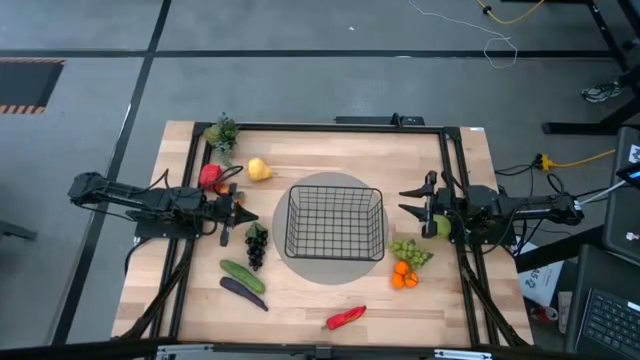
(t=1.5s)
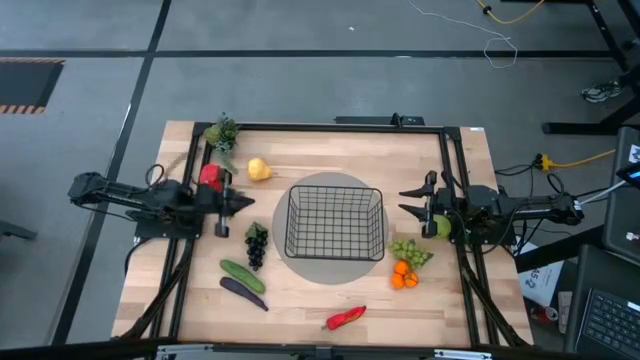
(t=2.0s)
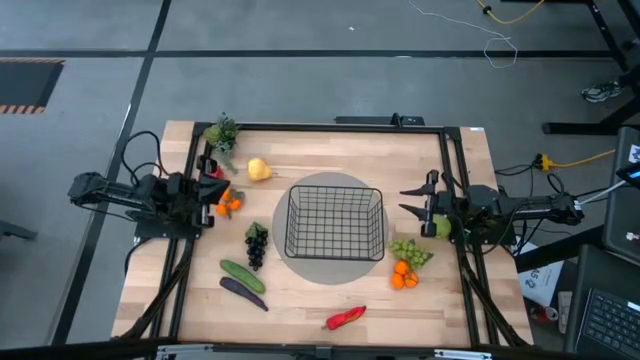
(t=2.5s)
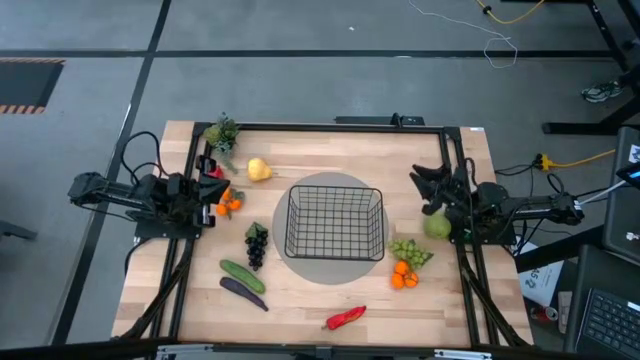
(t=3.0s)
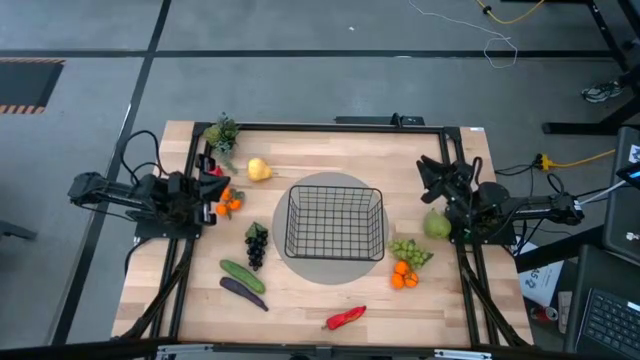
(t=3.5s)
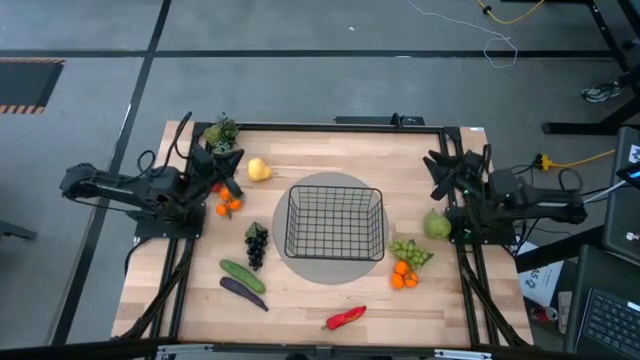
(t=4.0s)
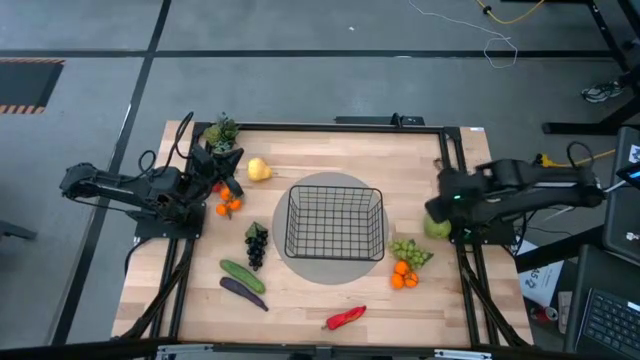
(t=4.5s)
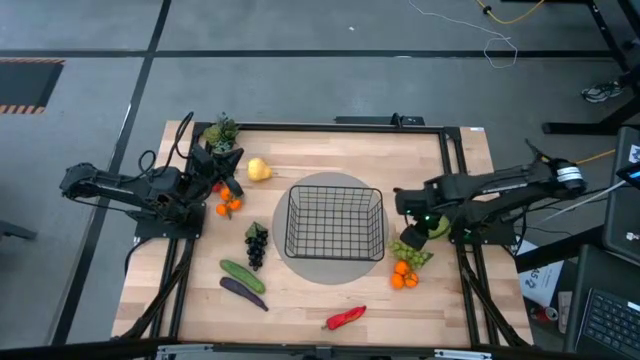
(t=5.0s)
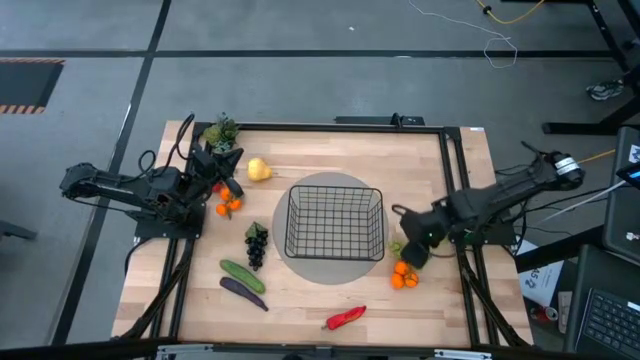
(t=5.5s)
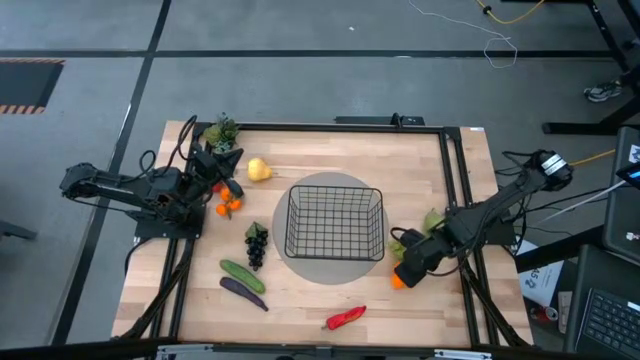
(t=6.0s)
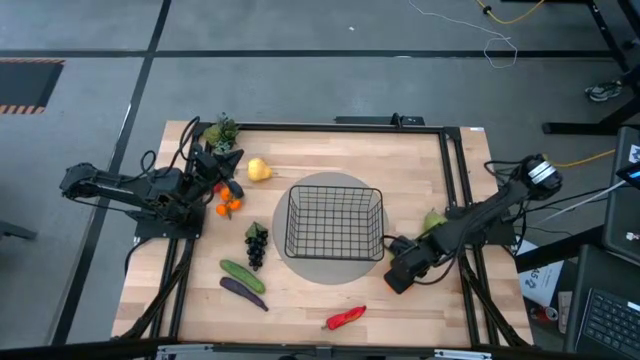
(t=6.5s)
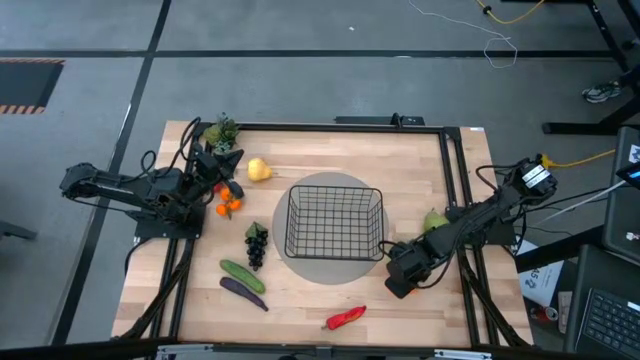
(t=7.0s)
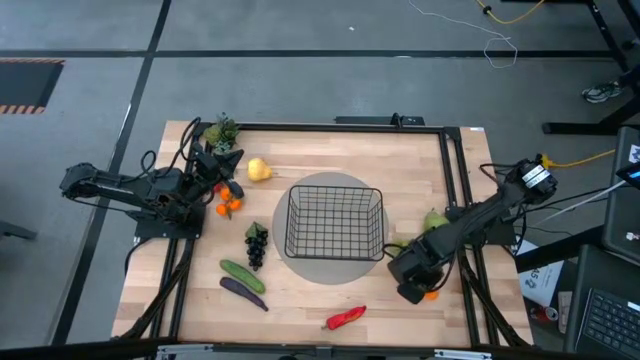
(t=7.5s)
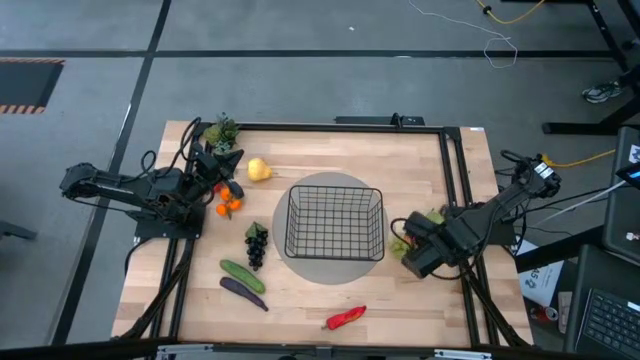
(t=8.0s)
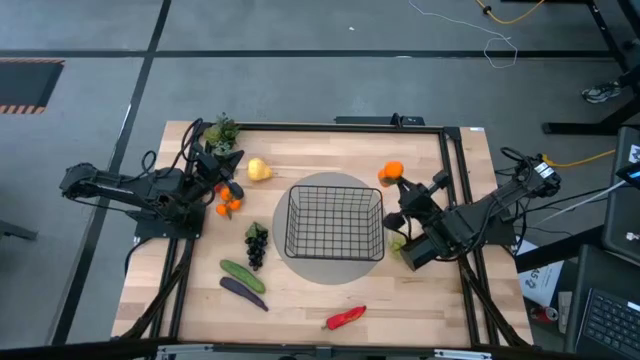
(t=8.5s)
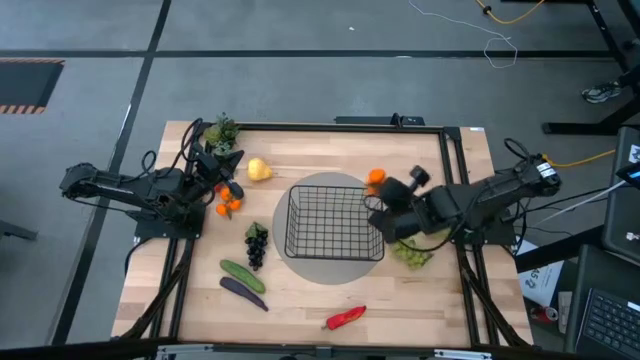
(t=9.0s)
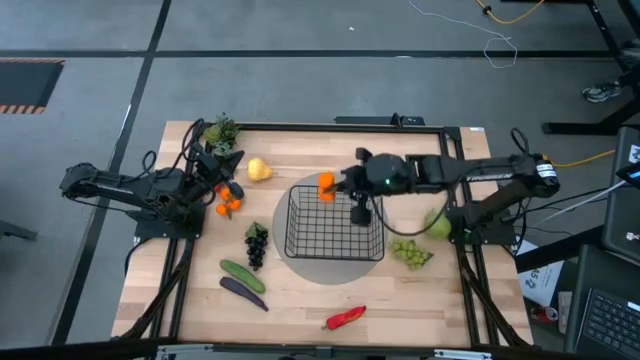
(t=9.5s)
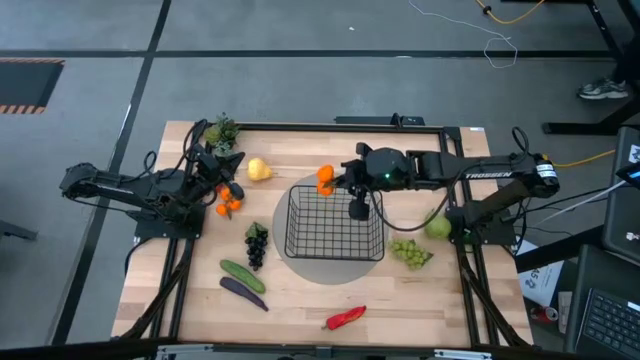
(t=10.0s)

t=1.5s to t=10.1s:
Task: Build produce basket
Put the bottom tangerines into the black wire basket

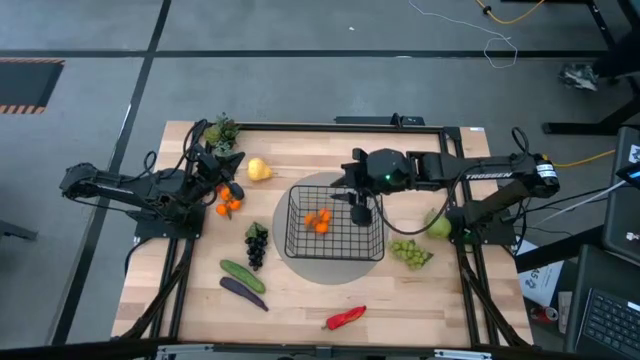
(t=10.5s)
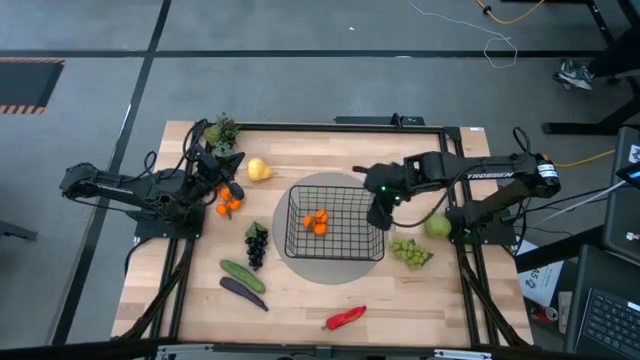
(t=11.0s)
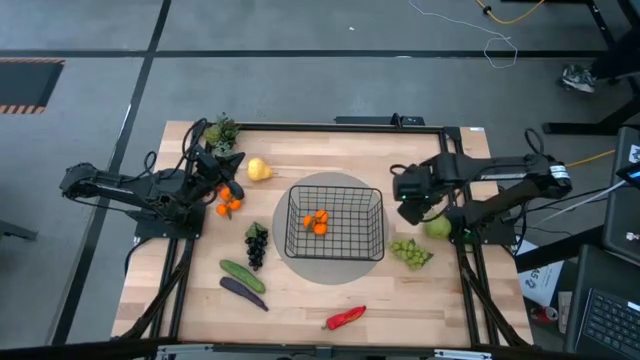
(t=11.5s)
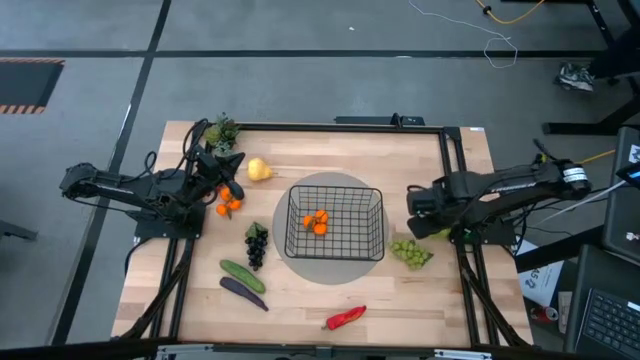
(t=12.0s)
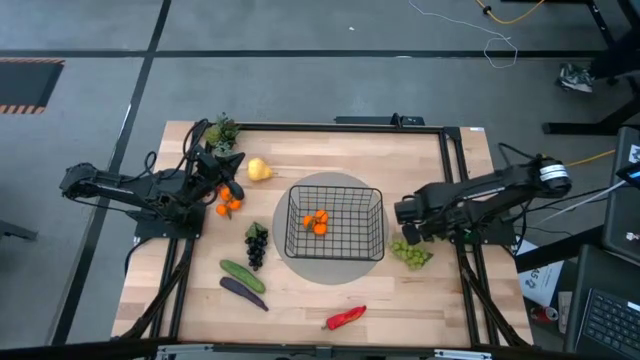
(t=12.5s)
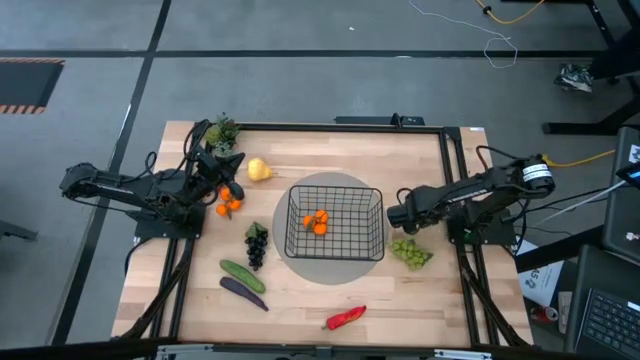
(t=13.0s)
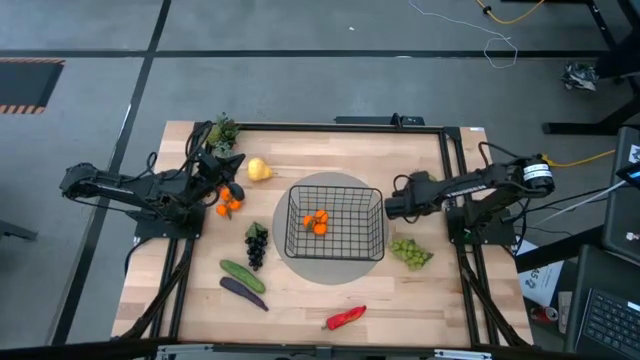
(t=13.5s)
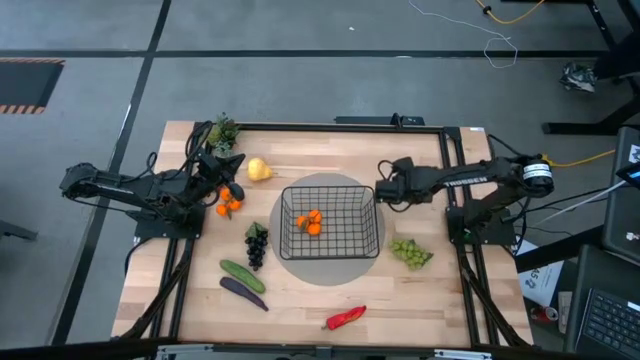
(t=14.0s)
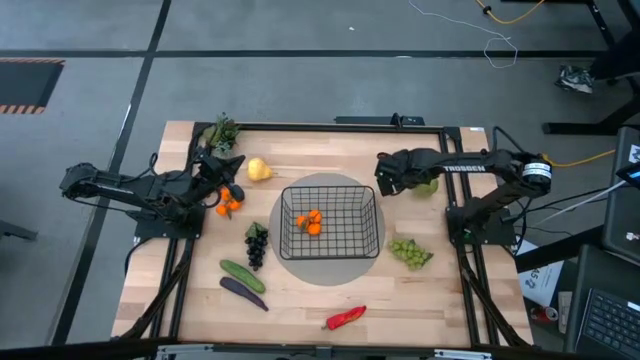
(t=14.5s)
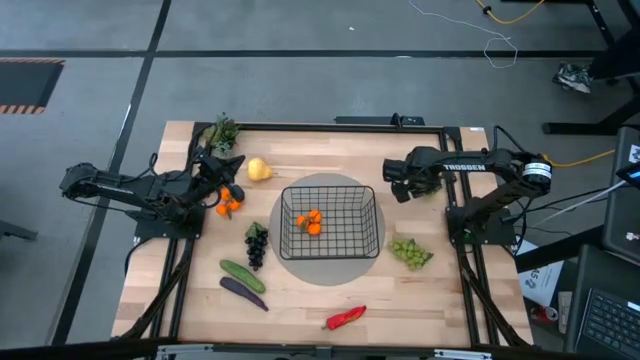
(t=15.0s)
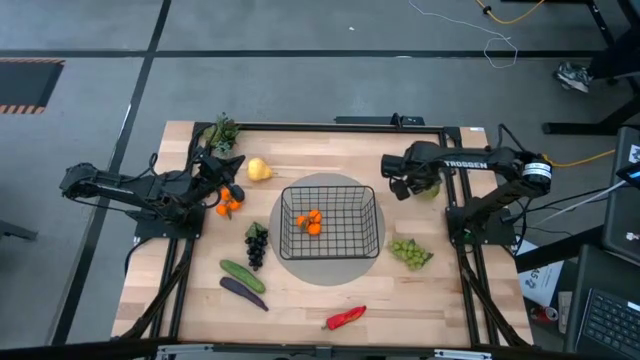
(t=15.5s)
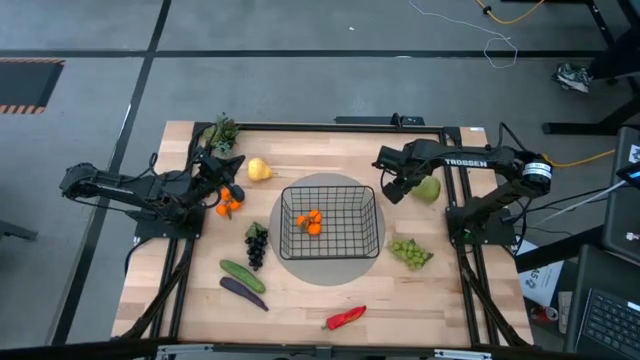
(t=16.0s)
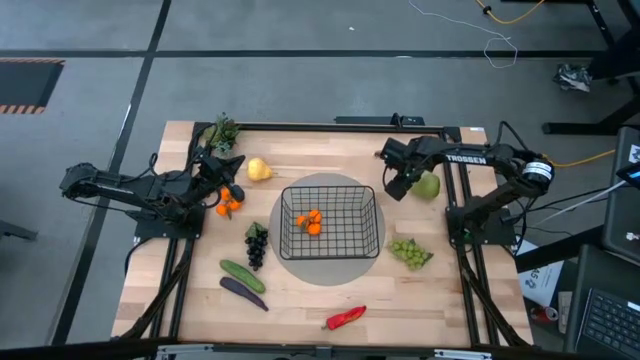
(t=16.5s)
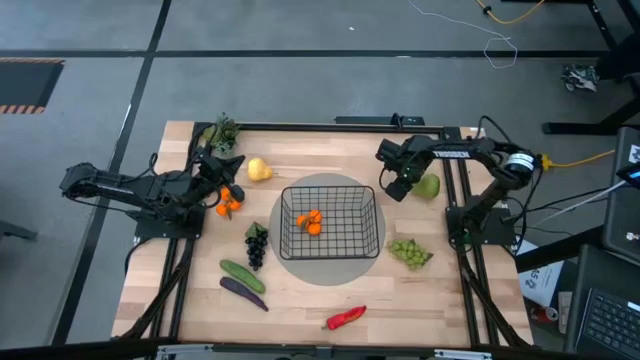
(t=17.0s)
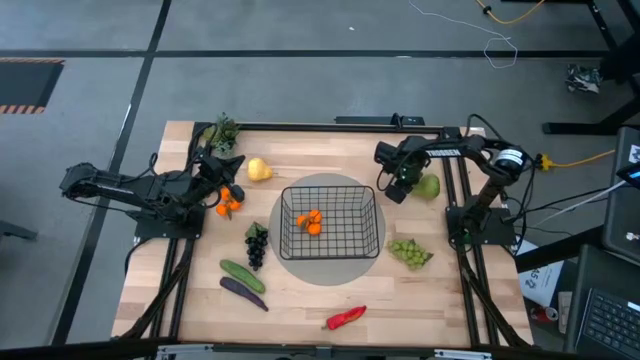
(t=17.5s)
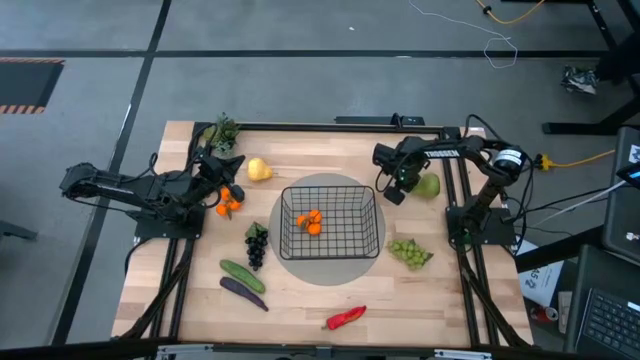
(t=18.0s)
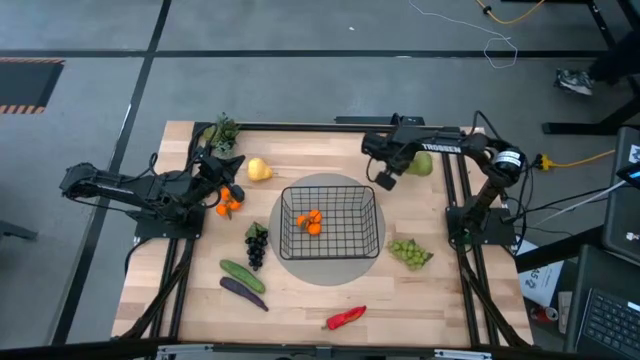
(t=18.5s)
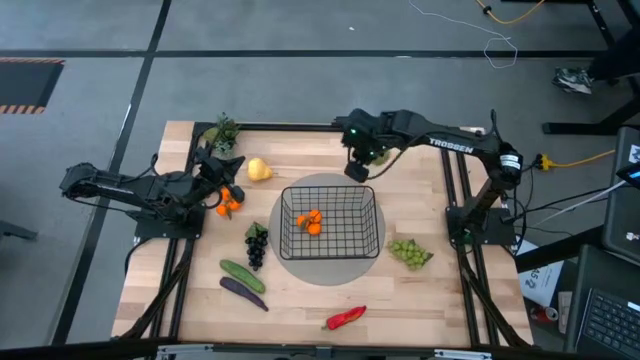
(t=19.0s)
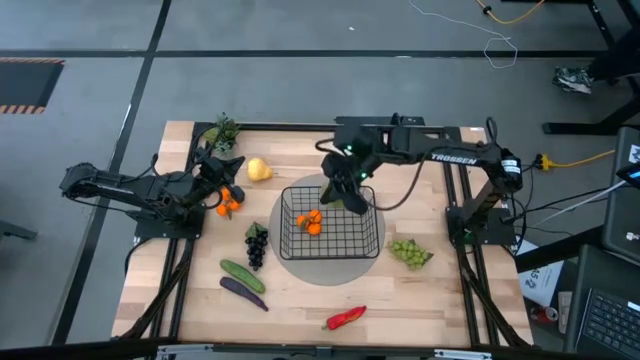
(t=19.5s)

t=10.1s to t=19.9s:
Put the green pear into the black wire basket

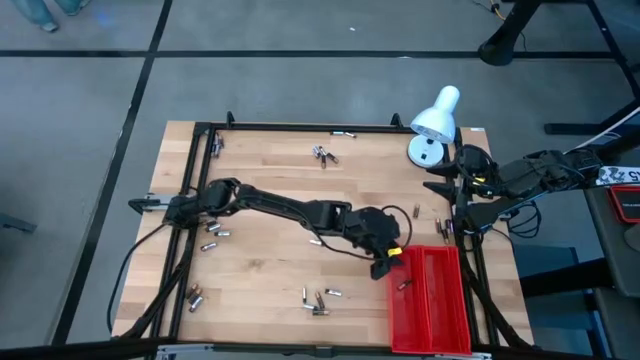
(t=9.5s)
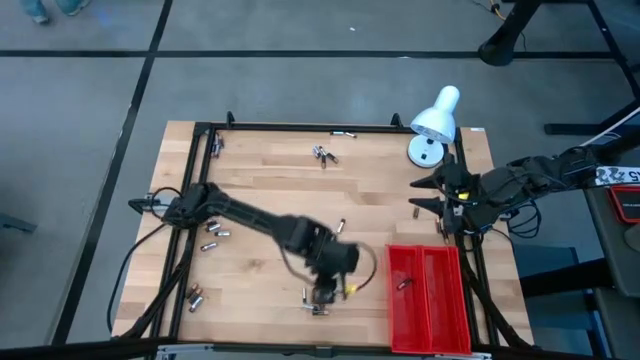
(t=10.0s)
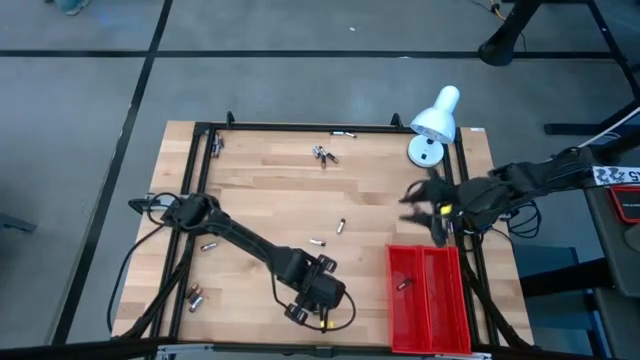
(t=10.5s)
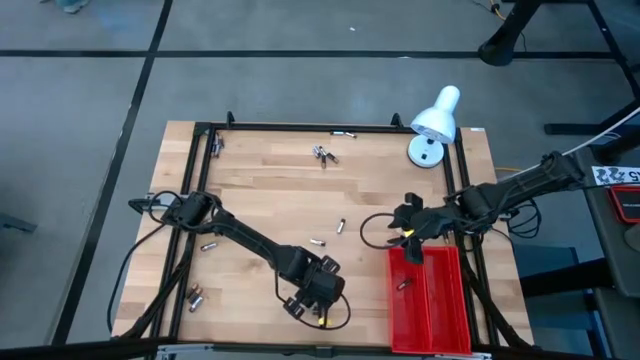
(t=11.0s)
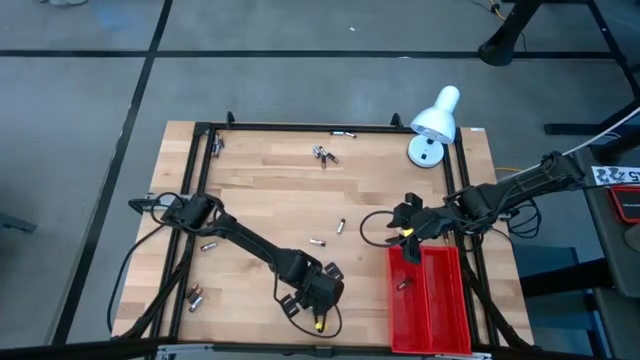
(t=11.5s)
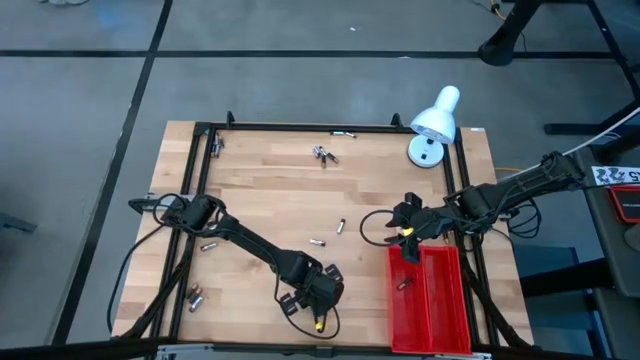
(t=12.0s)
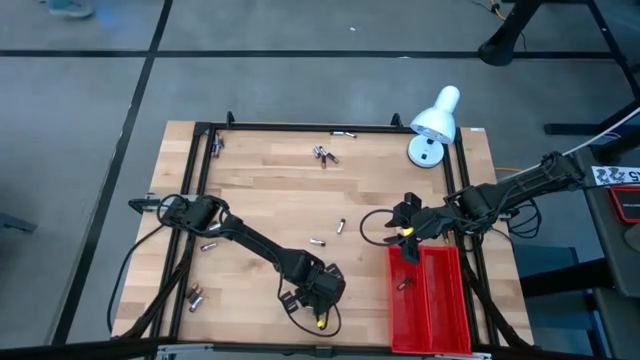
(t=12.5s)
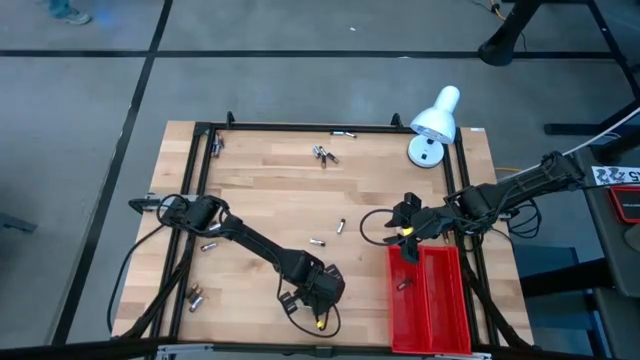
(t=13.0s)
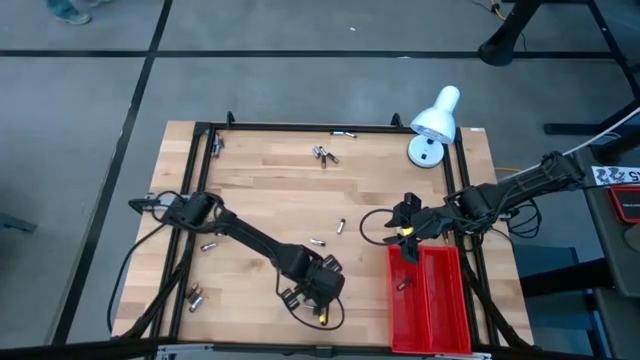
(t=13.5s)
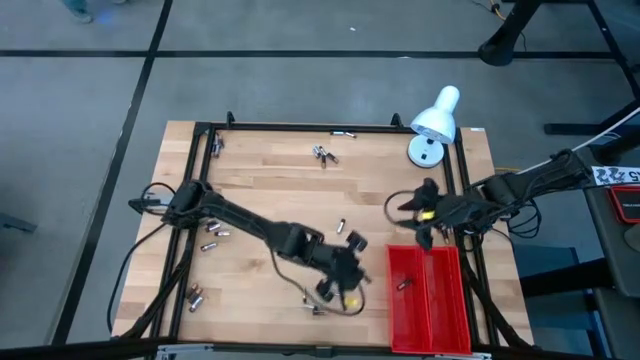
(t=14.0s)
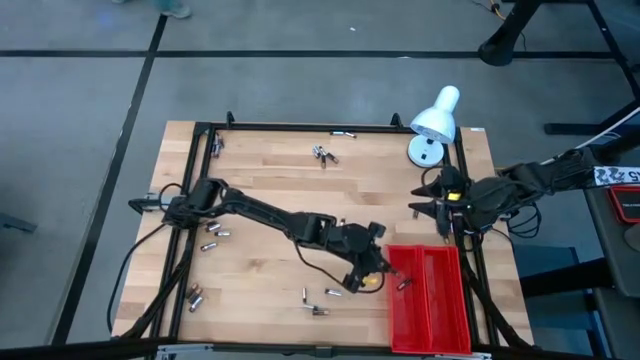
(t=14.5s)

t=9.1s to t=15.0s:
Task: Sort batteries
Put the black battery into the left red bin
